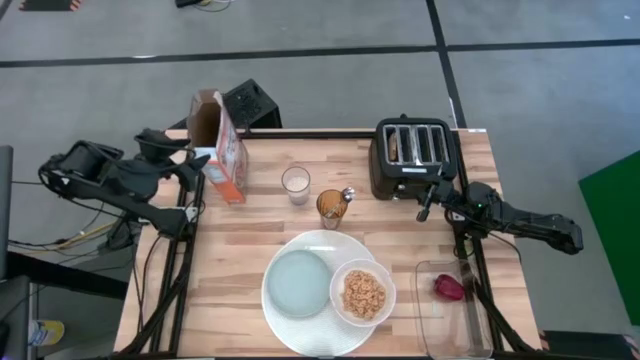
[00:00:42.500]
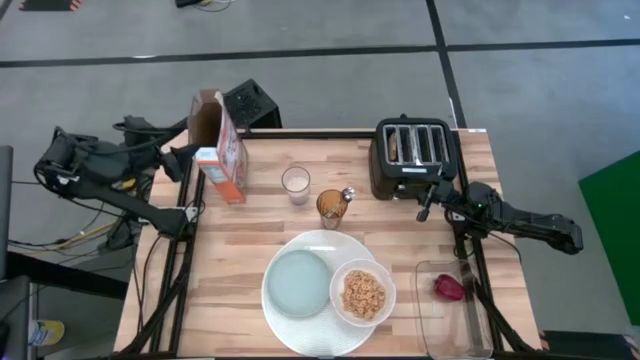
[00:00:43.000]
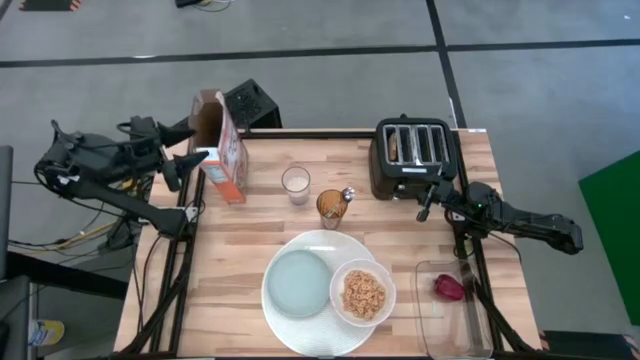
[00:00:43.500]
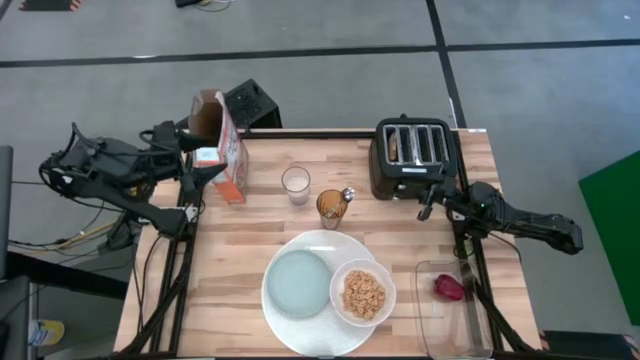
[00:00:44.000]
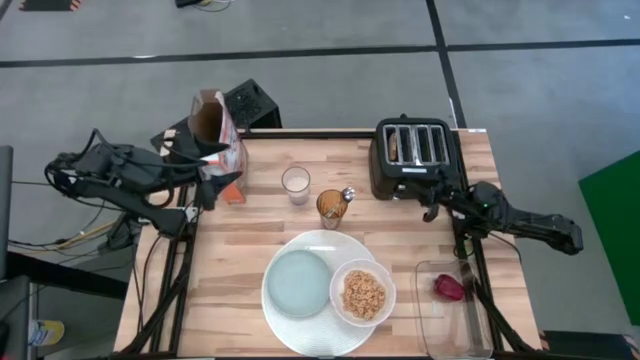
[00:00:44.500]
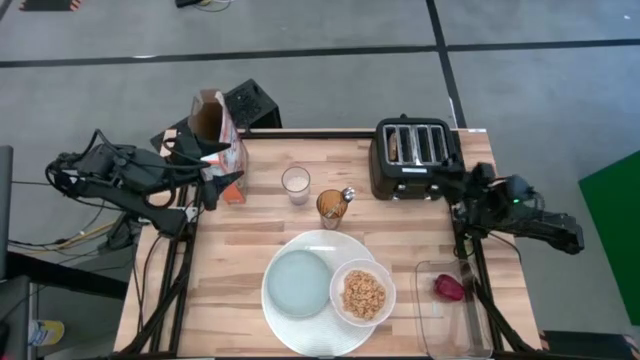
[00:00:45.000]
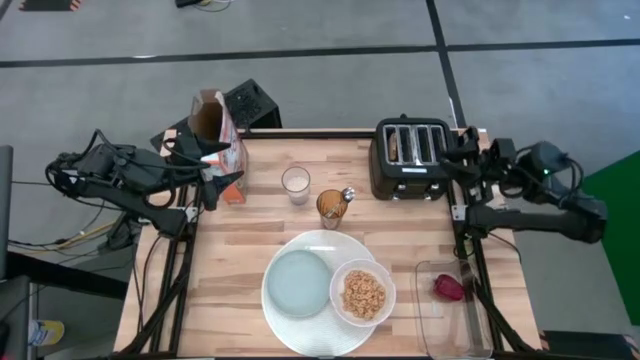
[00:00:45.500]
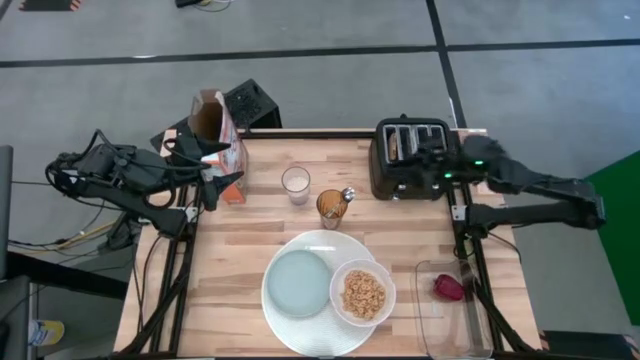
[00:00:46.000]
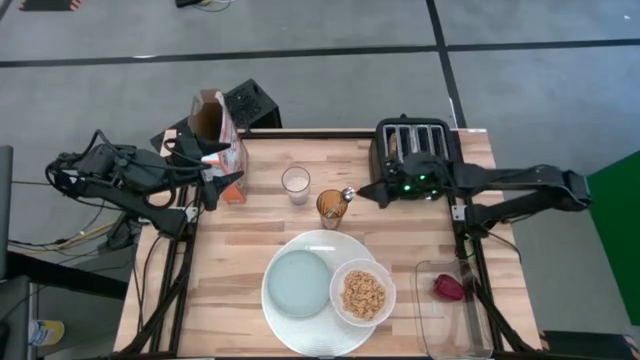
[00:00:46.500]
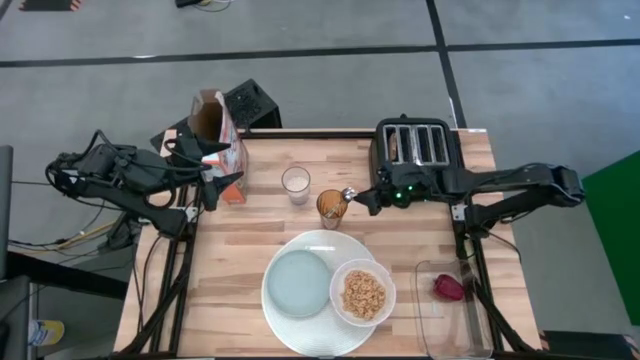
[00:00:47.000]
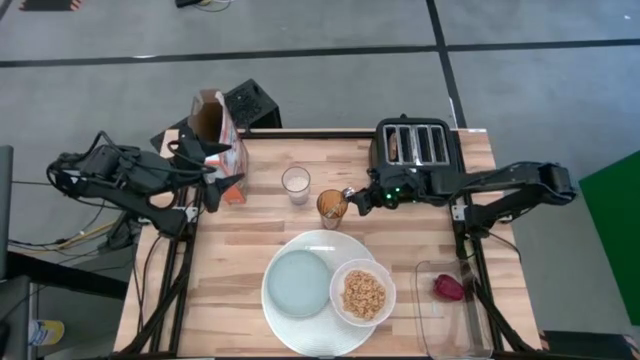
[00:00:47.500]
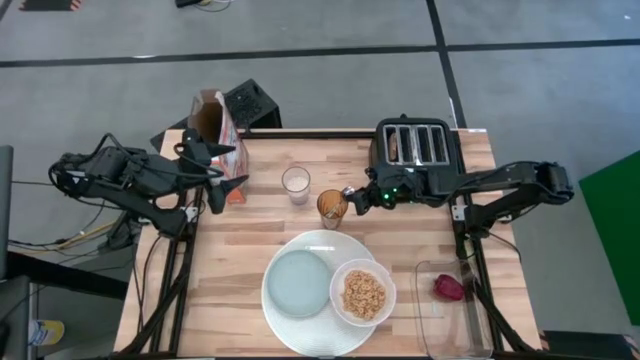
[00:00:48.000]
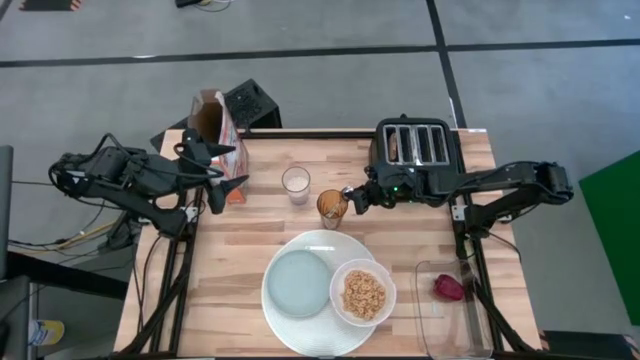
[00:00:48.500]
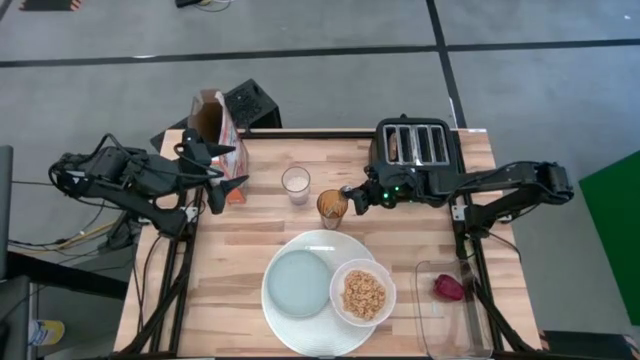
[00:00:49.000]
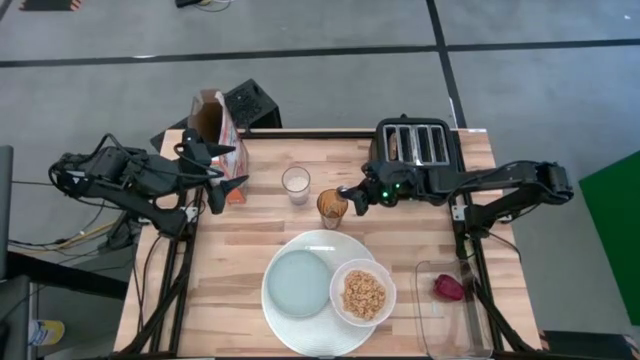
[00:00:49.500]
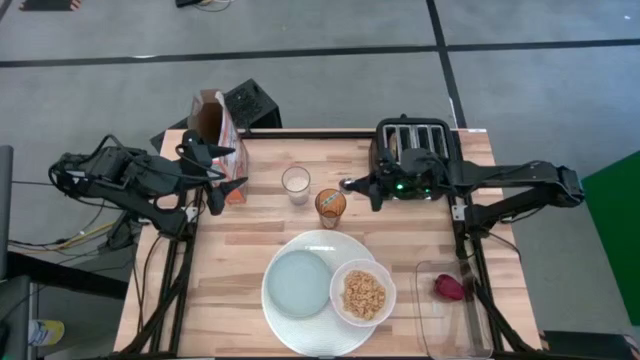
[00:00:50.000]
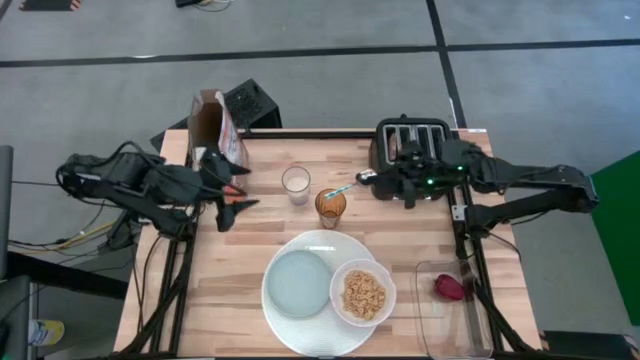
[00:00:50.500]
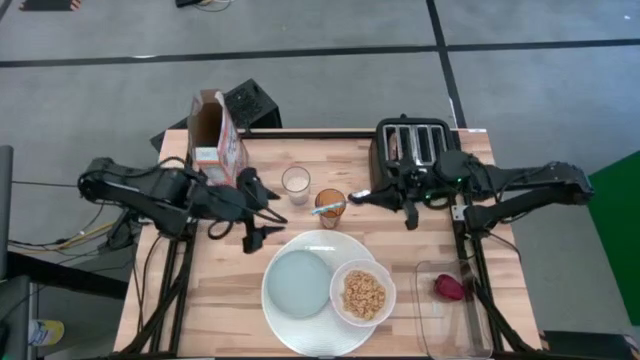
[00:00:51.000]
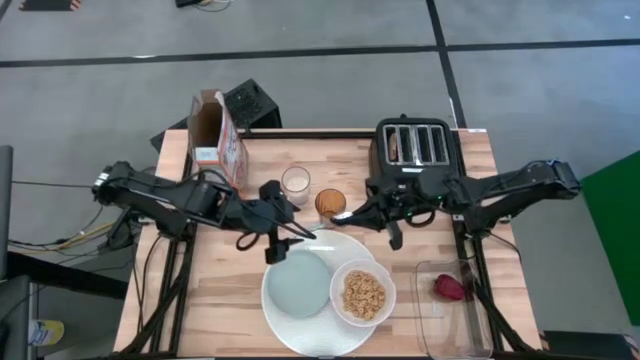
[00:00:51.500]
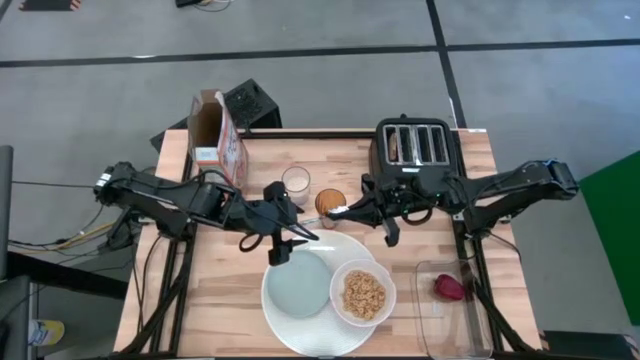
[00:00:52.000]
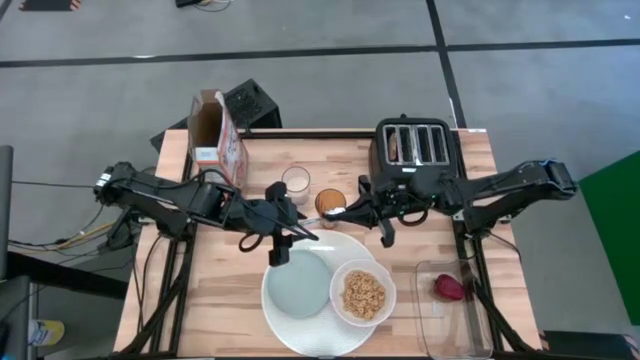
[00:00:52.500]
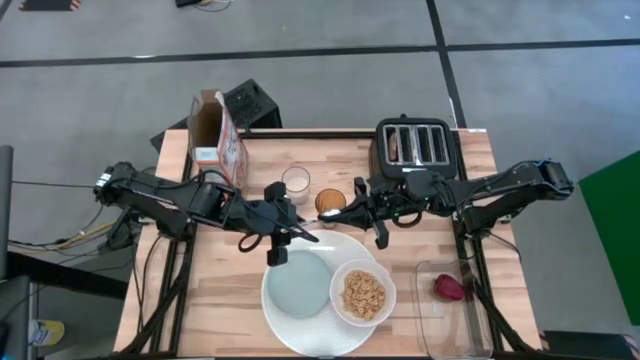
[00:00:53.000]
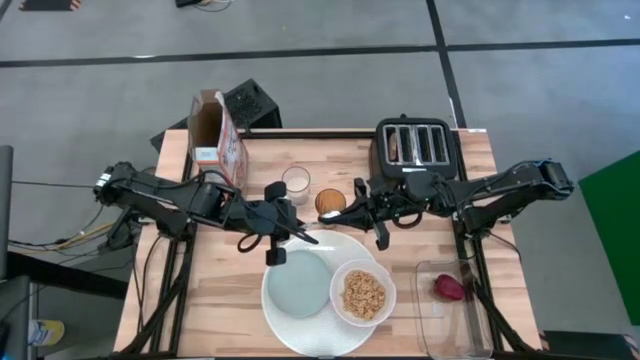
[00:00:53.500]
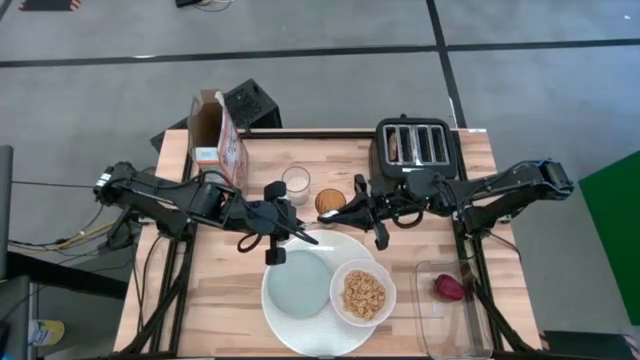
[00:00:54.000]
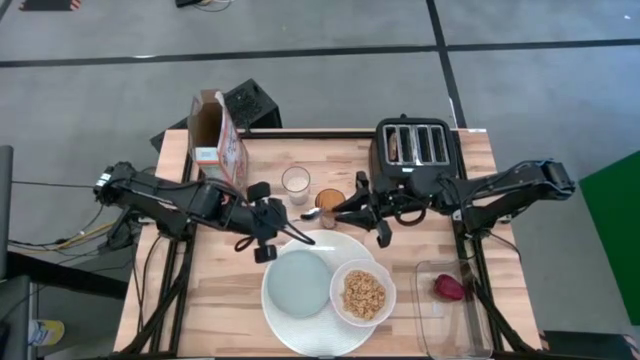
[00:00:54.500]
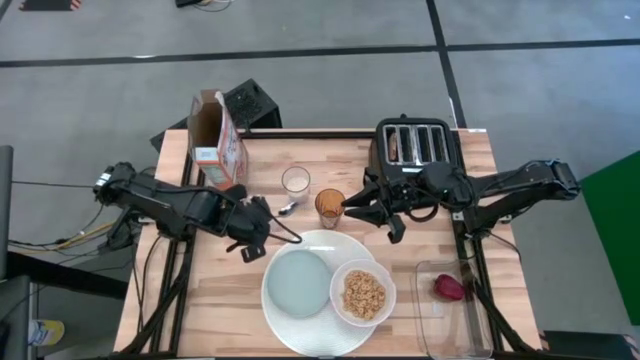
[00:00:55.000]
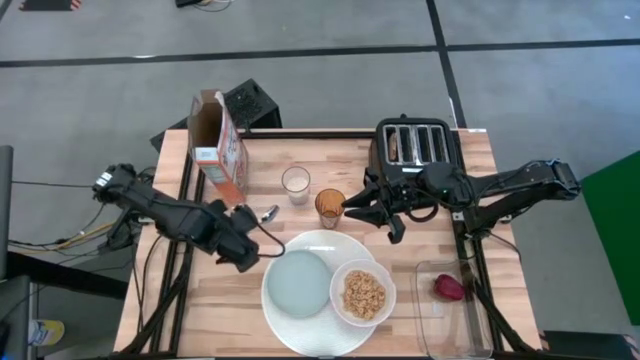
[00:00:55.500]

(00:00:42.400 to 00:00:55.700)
Task: Arrange a breakfast setting
Put the blue patterned spoon to the left of the gray plate

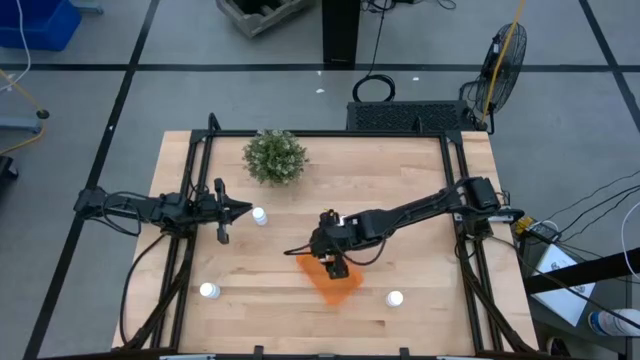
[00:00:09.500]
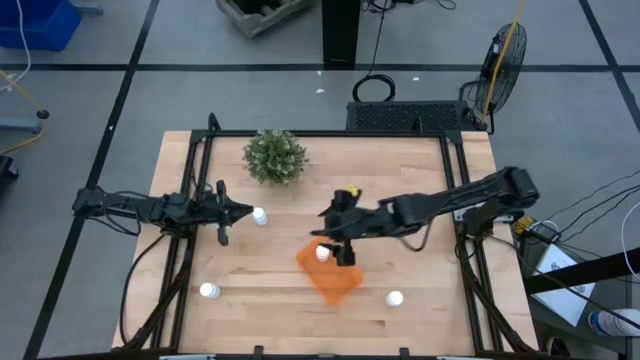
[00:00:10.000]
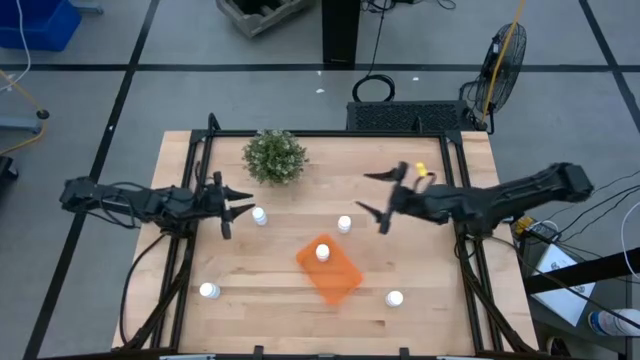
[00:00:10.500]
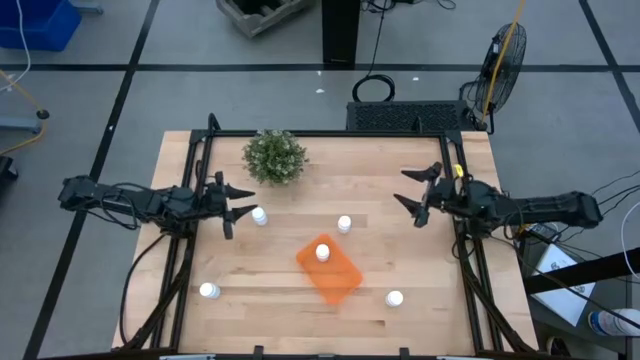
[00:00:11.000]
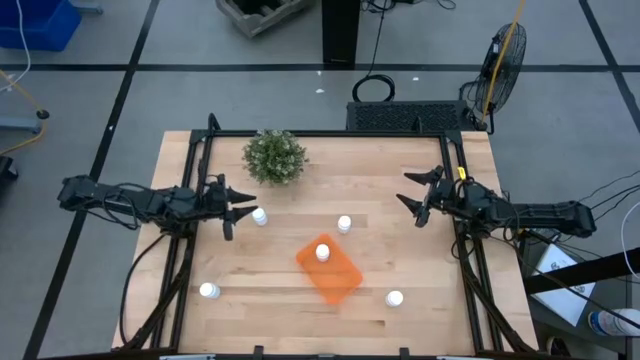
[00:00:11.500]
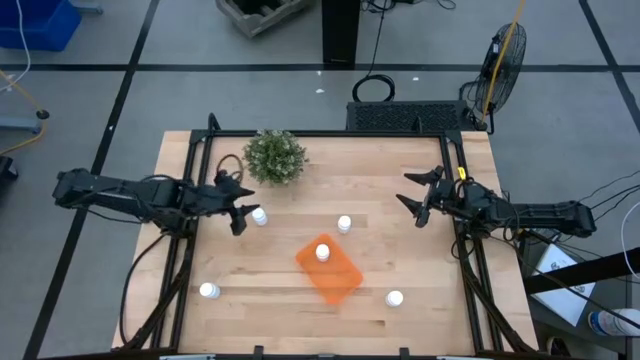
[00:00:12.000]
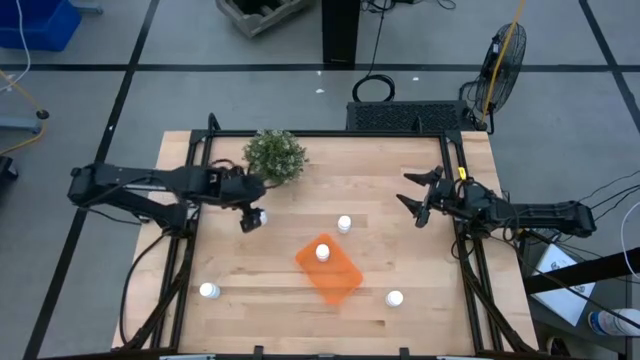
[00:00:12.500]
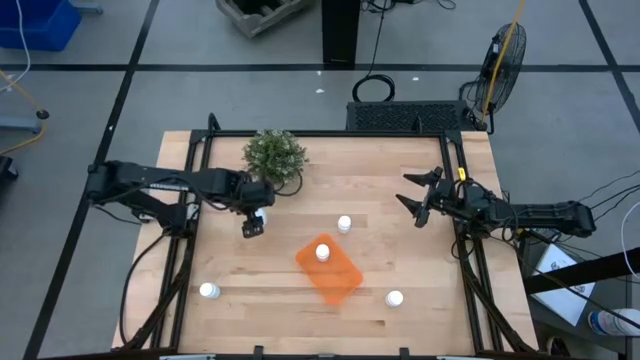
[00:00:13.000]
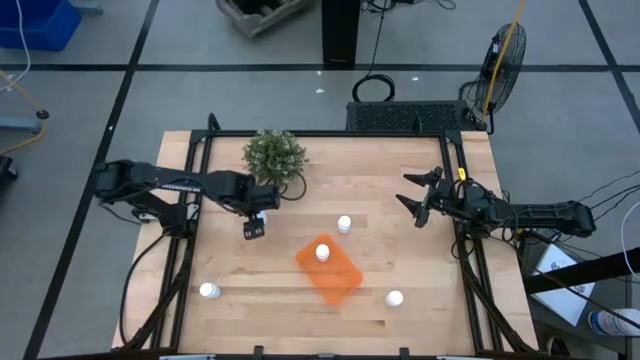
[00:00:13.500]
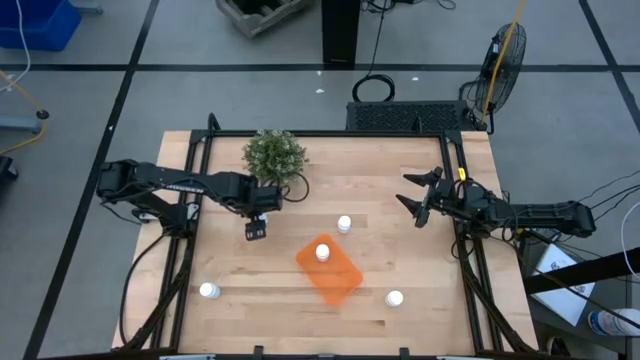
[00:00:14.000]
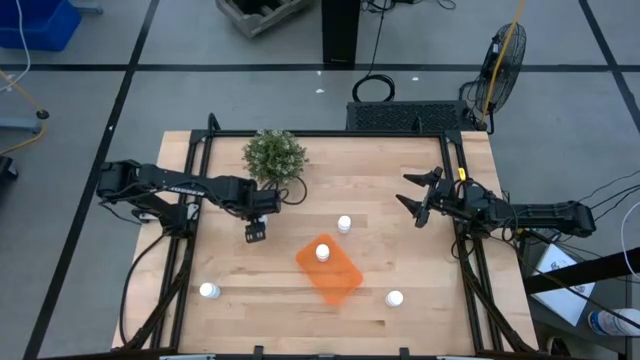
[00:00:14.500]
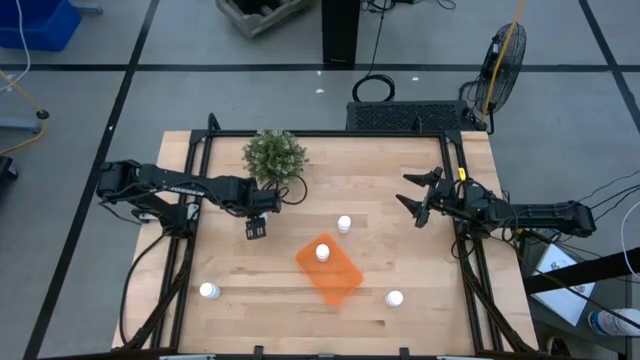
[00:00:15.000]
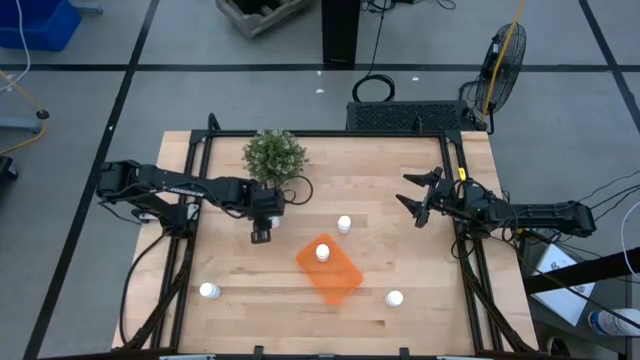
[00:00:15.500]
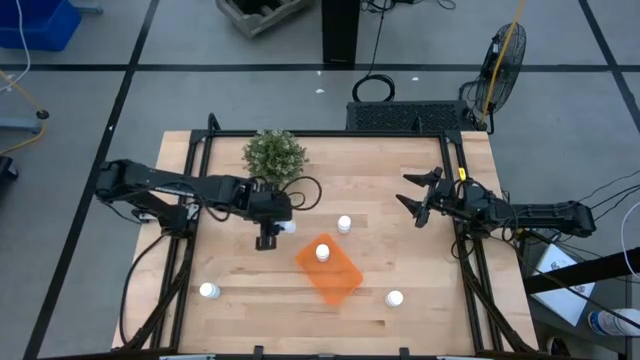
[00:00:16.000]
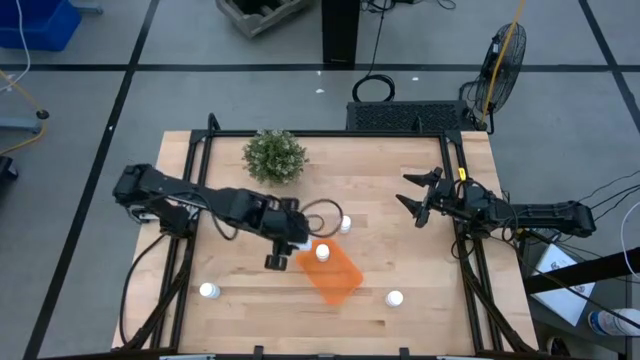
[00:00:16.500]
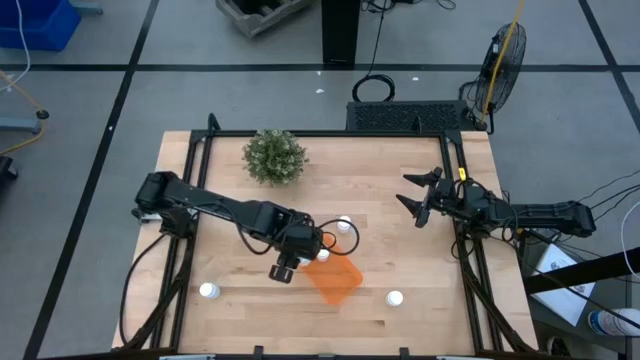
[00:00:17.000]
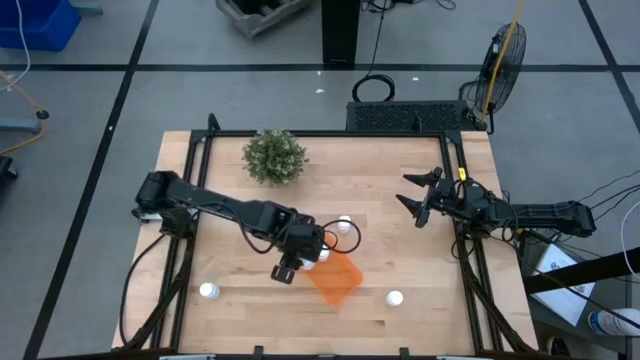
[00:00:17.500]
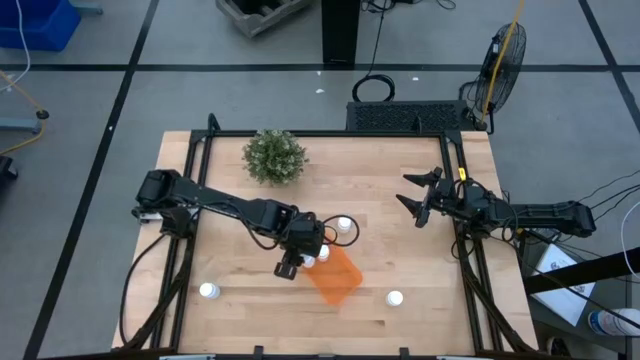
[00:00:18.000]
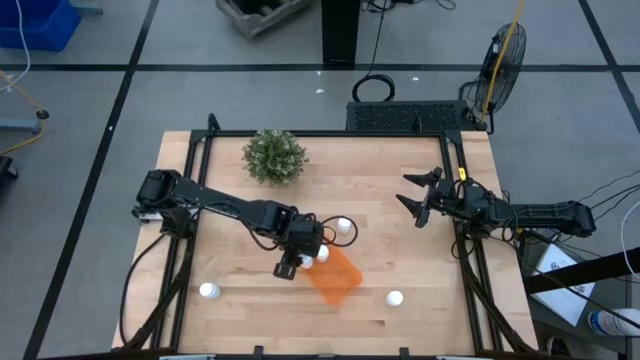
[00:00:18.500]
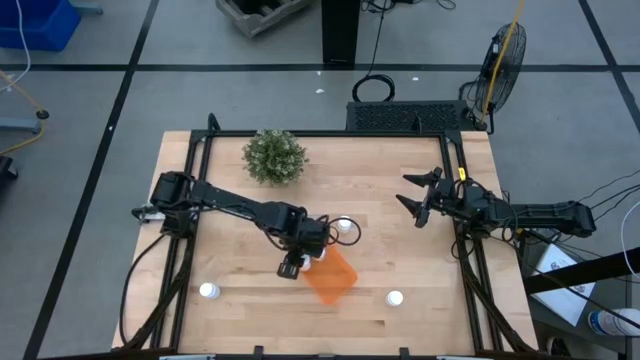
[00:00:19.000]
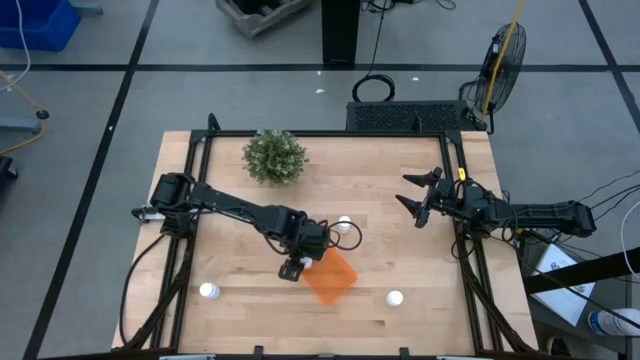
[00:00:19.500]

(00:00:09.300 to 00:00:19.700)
Task: Pick and place pill bottles into a basket
Put the white medicine bottle into the orange bin
